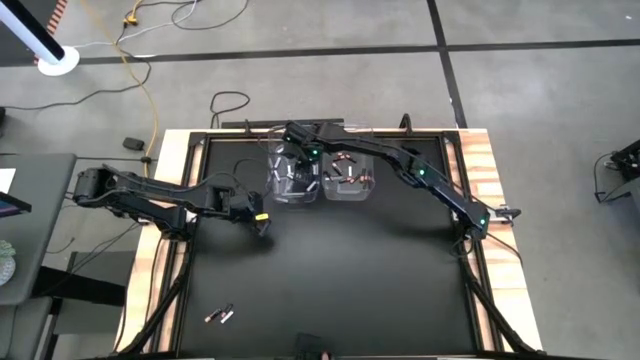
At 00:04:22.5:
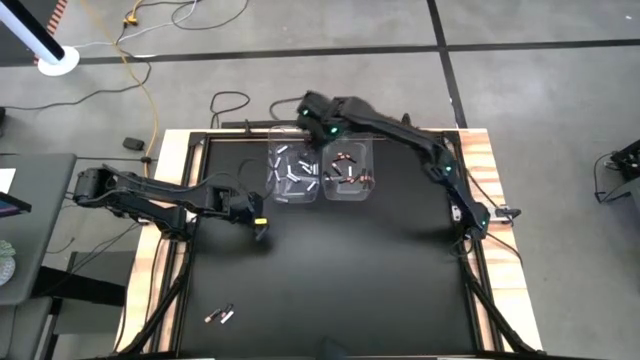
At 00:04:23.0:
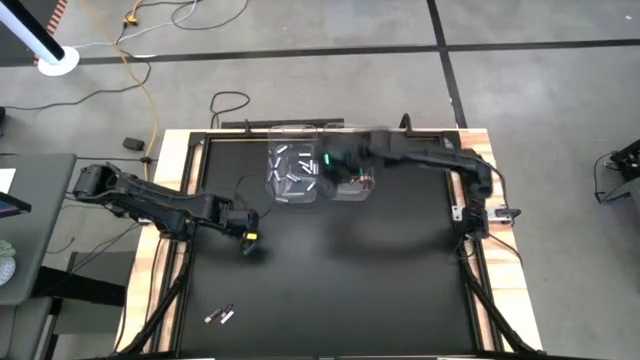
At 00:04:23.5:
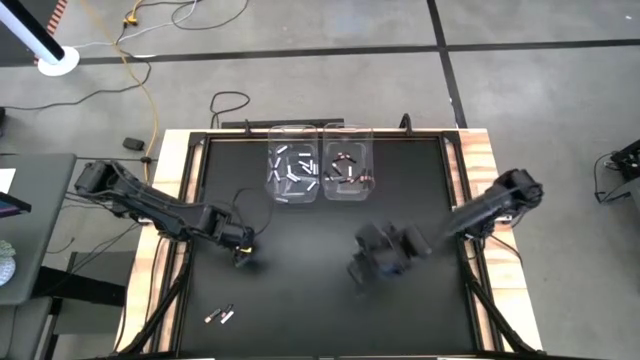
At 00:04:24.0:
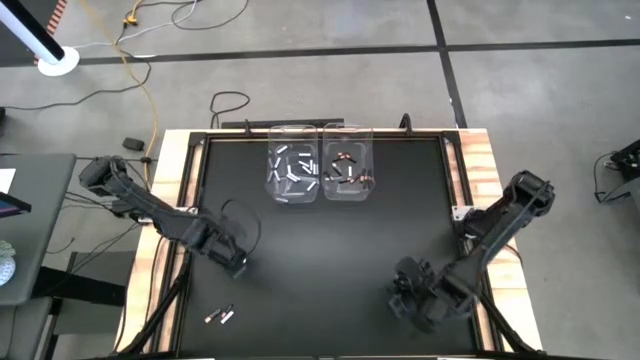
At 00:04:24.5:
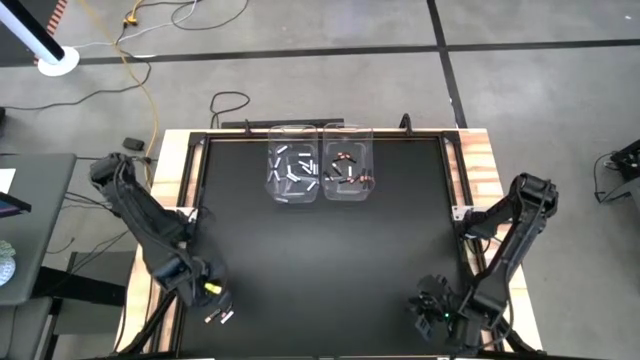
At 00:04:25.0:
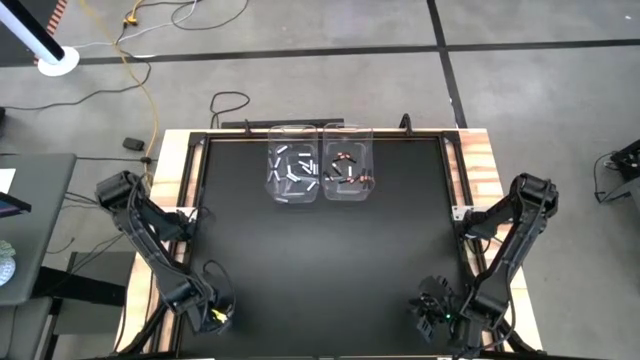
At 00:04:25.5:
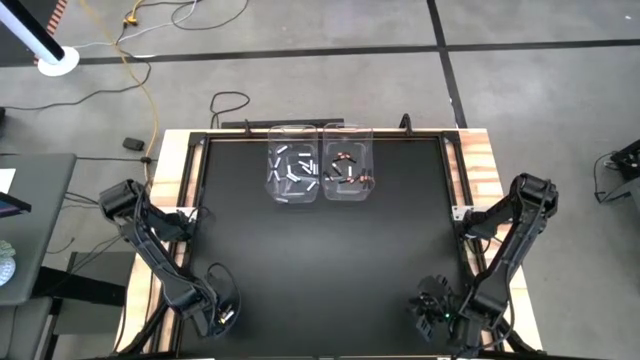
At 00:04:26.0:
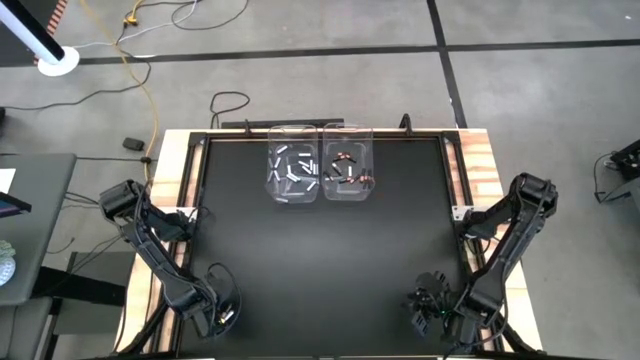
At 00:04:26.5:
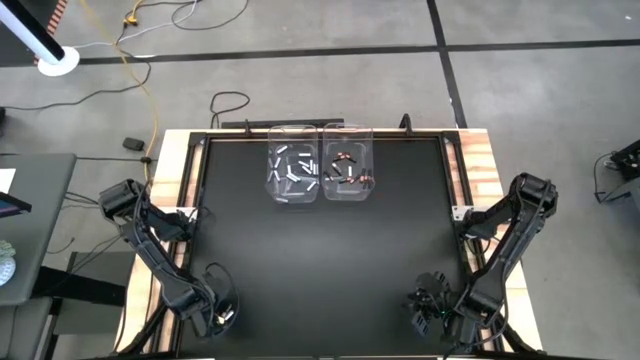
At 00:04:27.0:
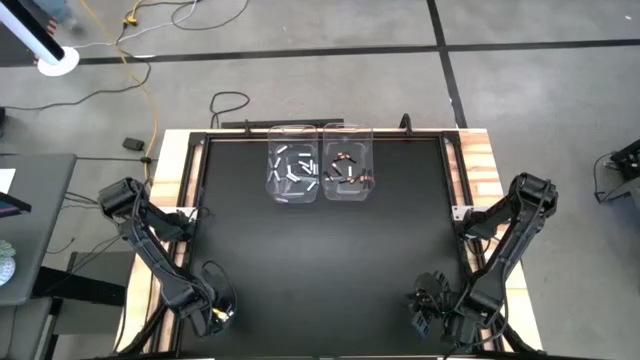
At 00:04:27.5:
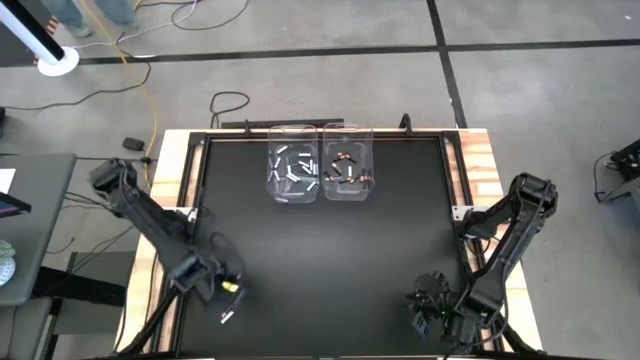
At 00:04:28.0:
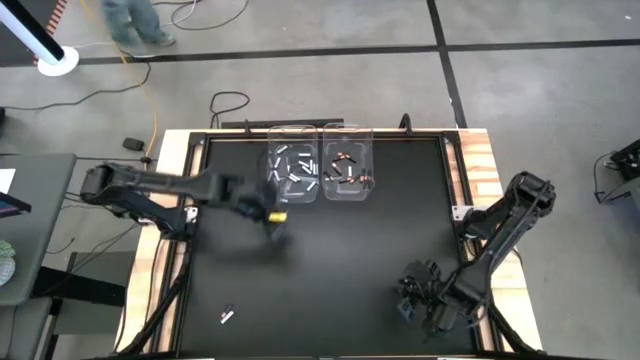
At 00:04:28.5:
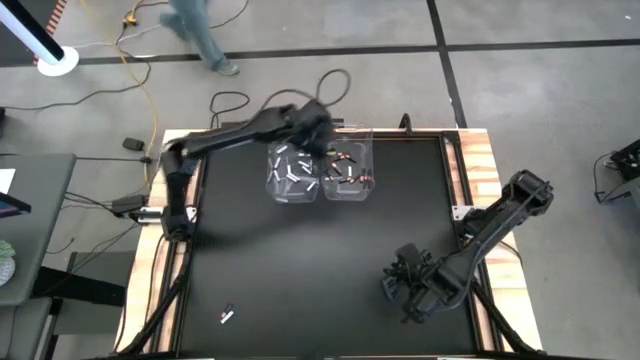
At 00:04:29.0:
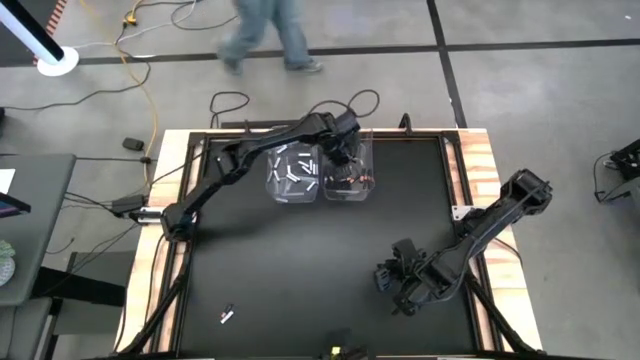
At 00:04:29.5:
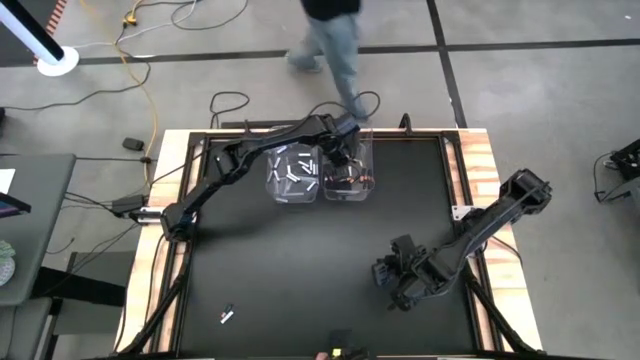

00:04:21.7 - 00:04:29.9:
Task: Sort batteries
Put the black battery into the right transparent bin

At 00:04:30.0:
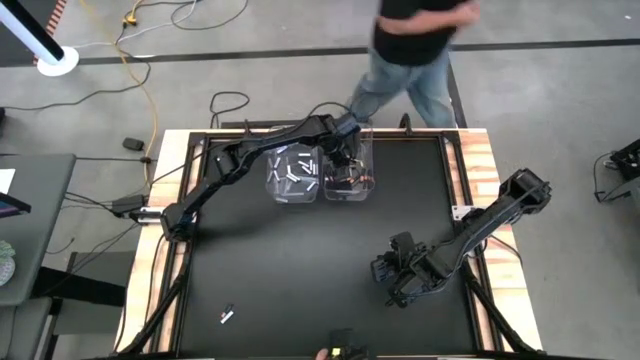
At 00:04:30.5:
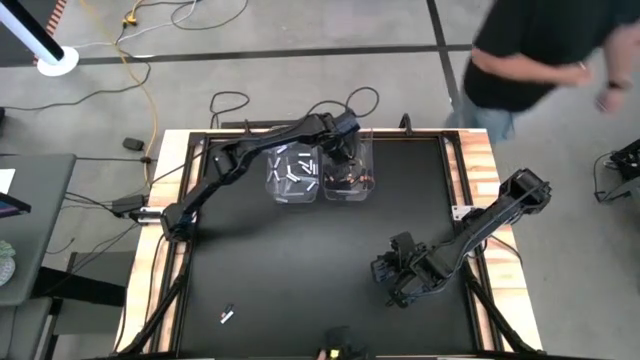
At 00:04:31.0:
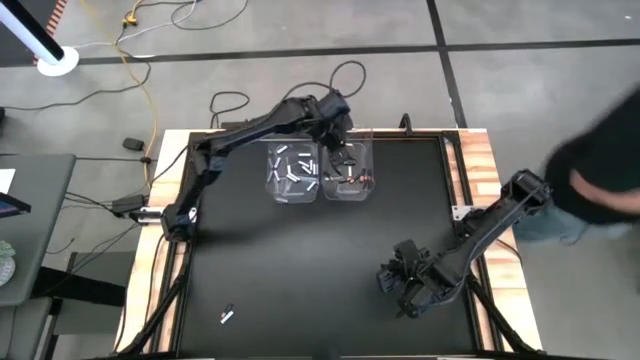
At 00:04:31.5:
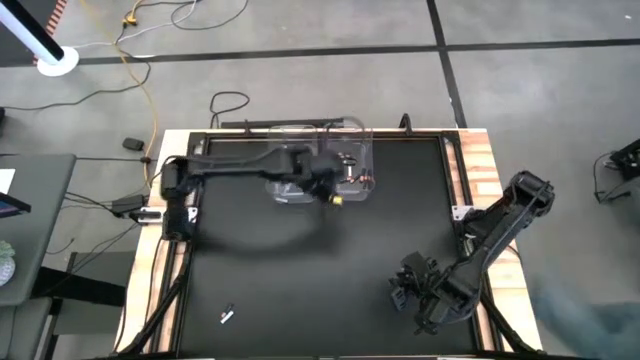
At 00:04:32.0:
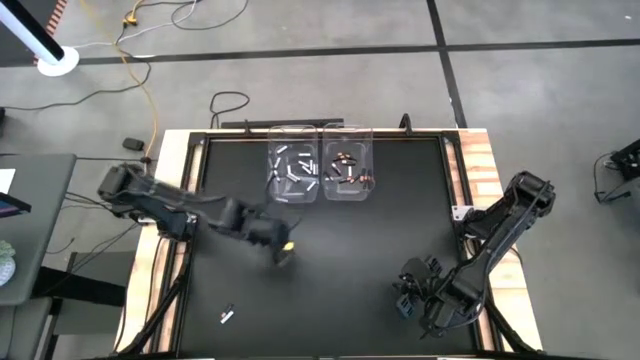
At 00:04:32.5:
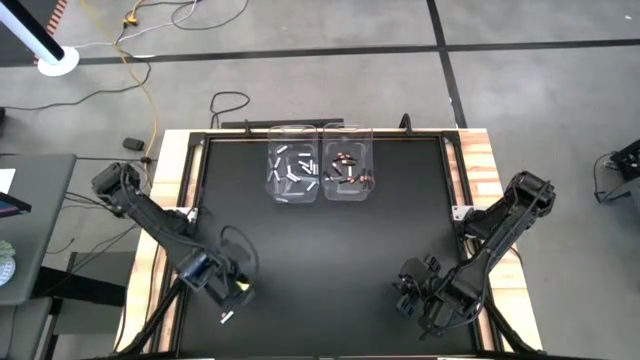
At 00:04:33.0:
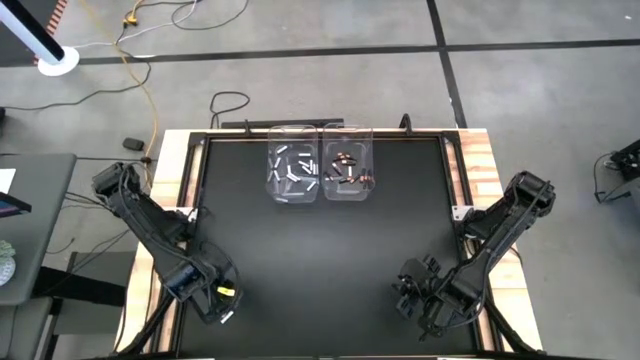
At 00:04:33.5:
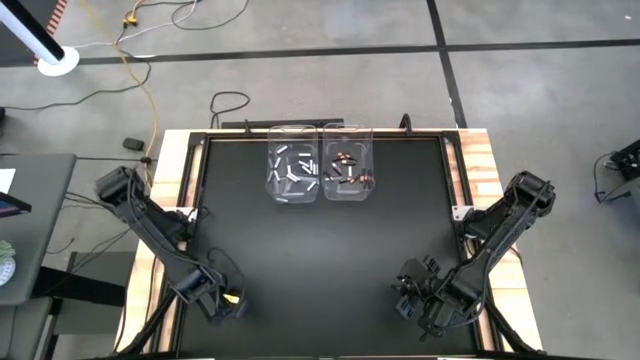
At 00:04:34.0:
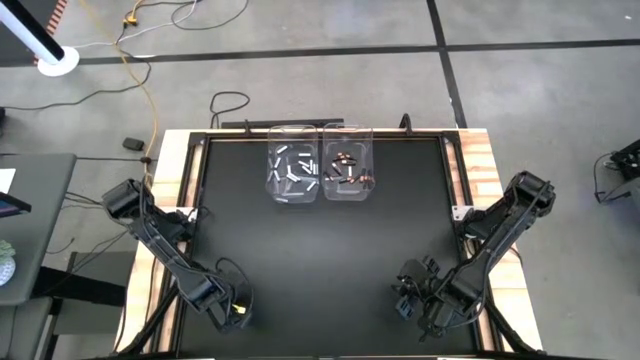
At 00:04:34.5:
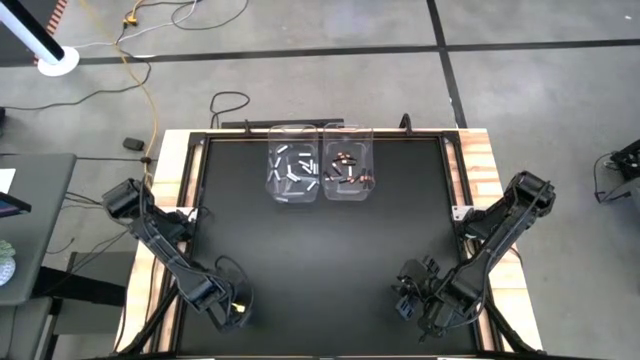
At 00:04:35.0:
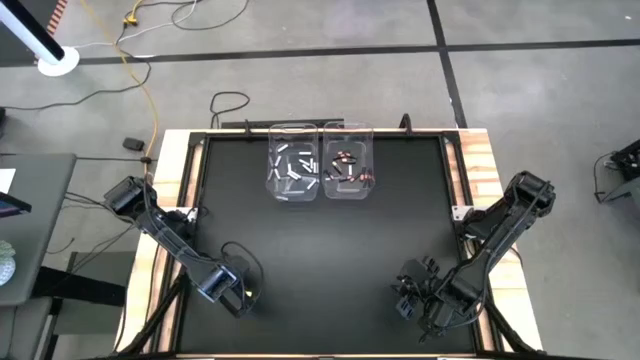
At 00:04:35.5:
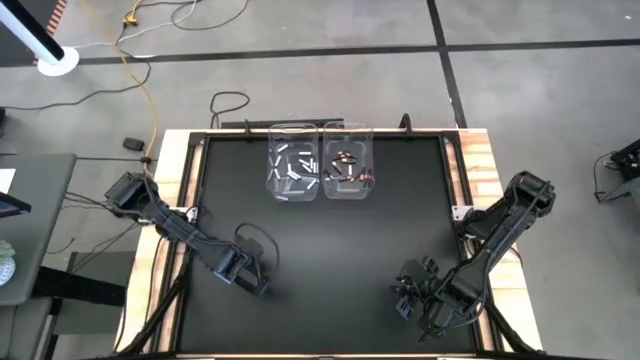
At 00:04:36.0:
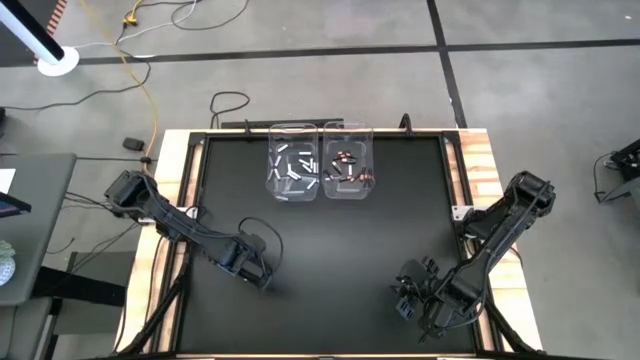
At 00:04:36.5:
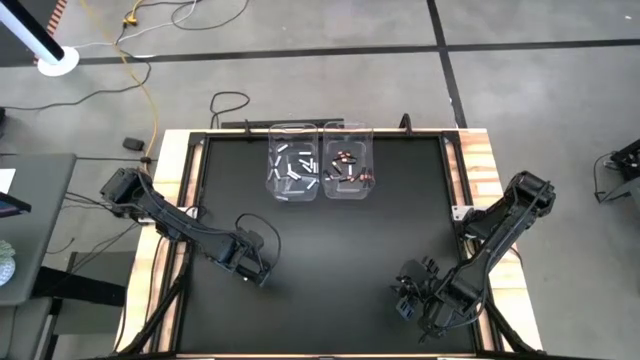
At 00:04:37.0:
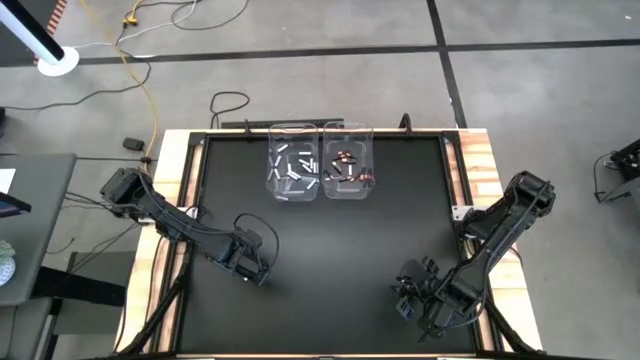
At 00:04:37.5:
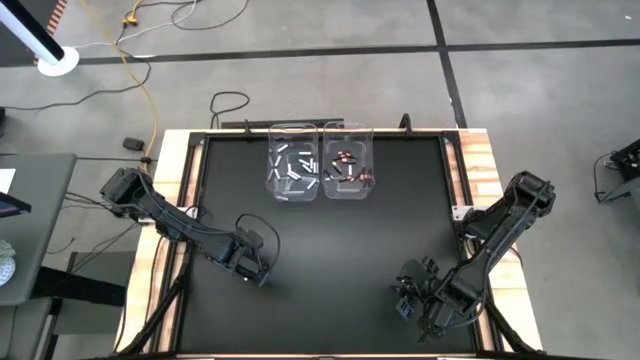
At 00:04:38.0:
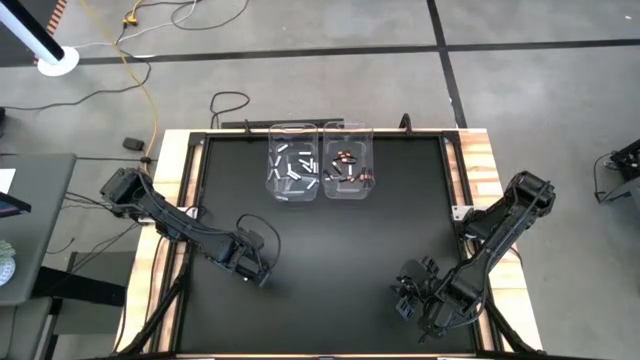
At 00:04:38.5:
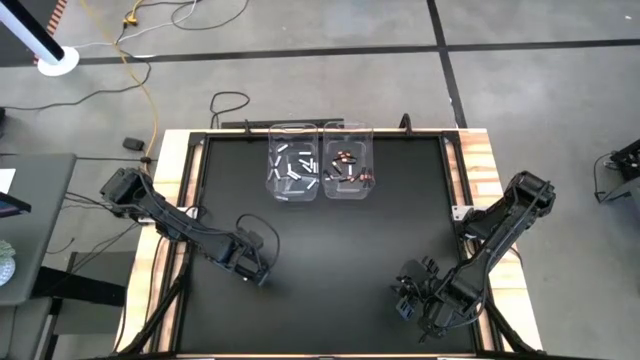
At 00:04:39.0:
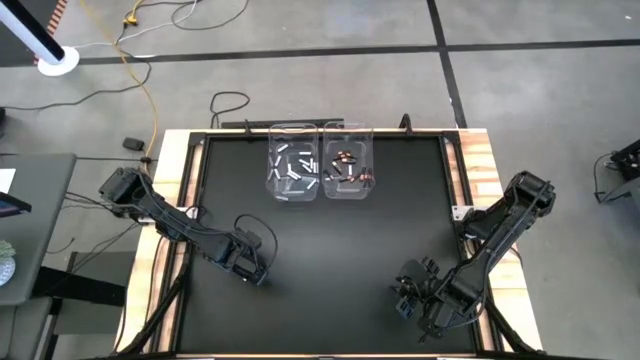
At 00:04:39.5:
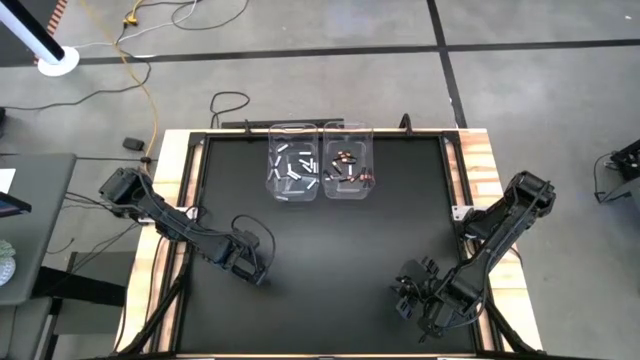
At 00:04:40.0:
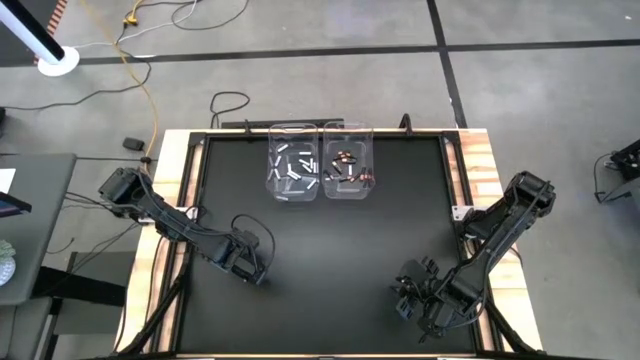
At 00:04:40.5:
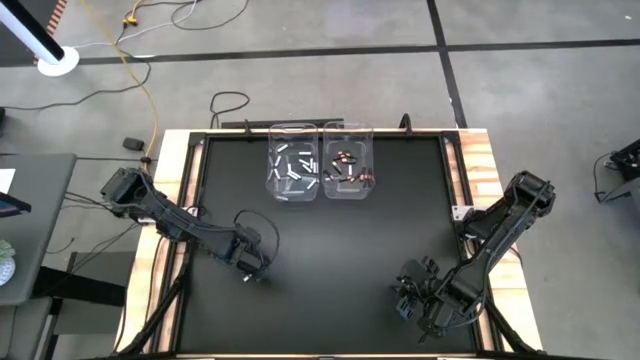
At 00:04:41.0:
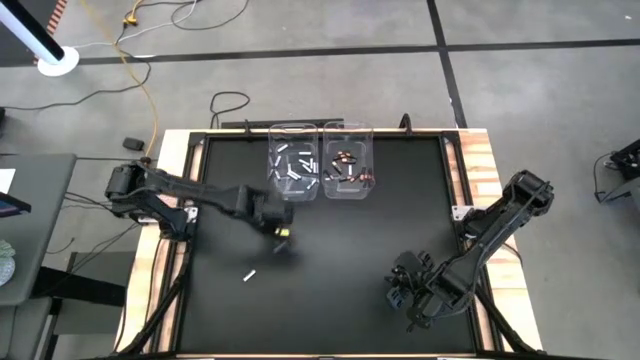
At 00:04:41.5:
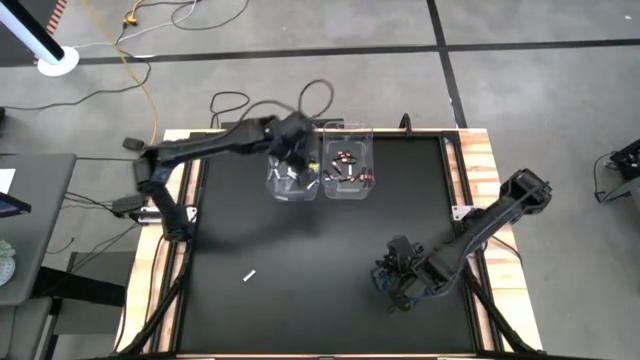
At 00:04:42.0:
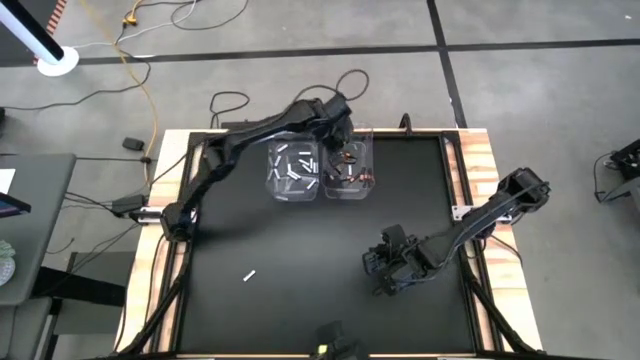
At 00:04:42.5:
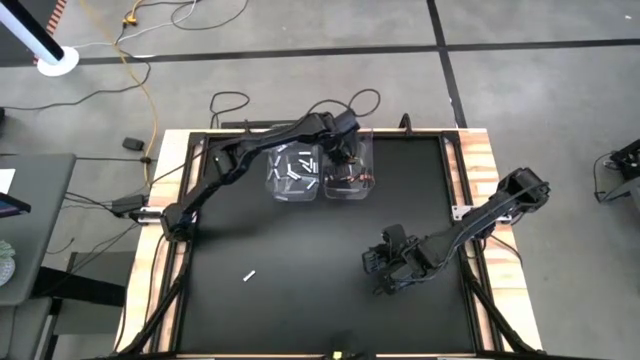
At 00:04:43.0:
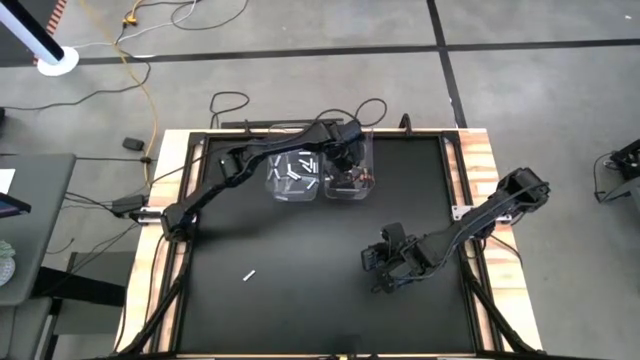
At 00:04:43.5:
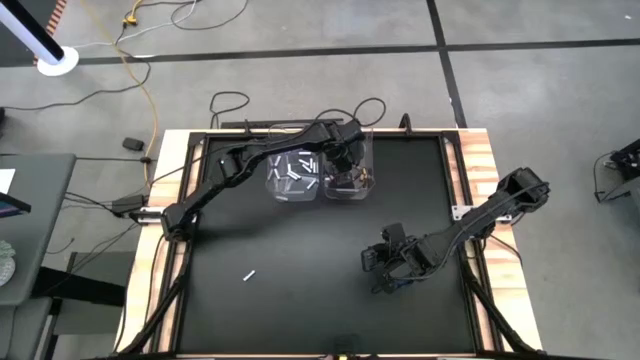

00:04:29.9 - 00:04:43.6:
Put the black battery into the right transparent bin
